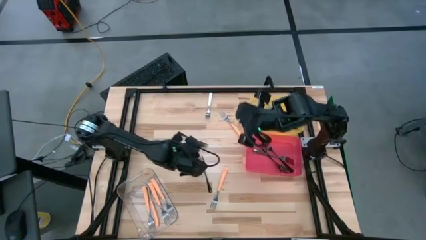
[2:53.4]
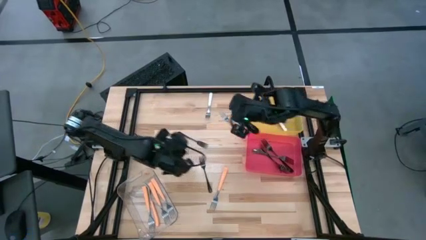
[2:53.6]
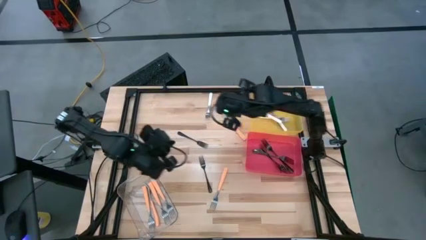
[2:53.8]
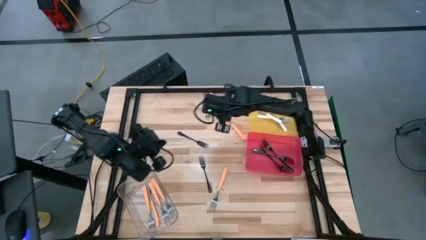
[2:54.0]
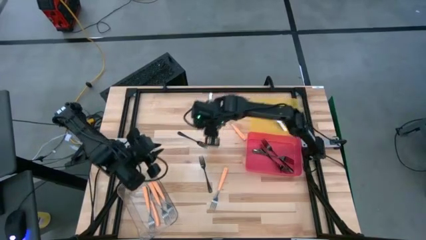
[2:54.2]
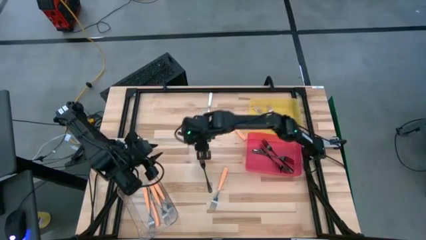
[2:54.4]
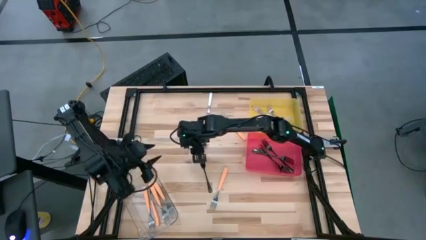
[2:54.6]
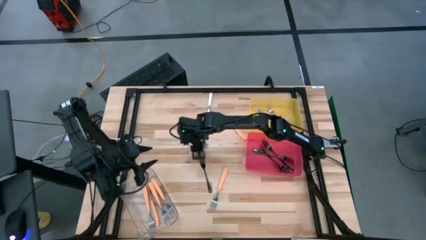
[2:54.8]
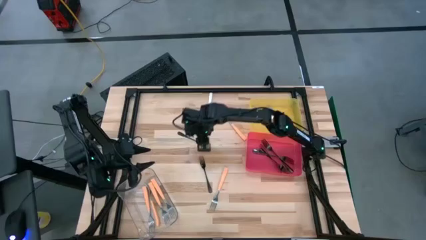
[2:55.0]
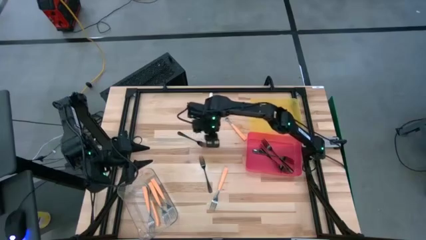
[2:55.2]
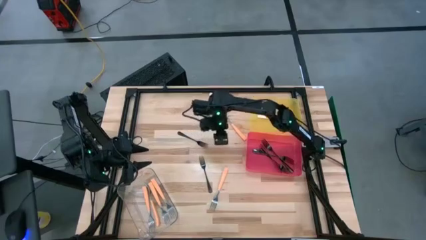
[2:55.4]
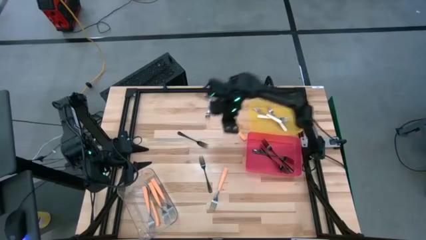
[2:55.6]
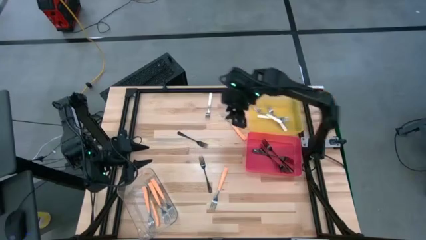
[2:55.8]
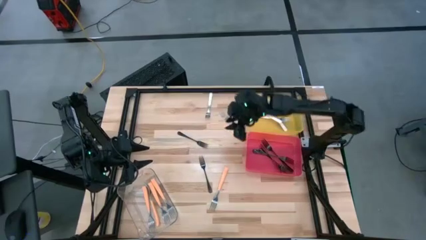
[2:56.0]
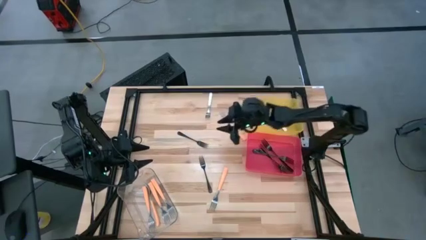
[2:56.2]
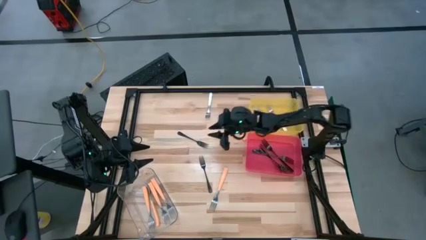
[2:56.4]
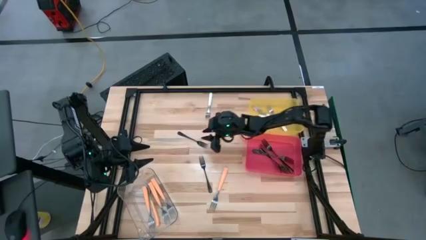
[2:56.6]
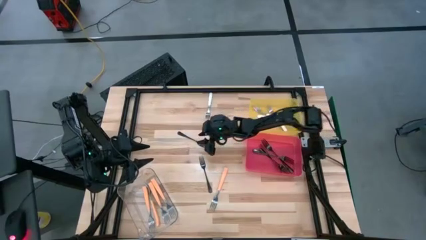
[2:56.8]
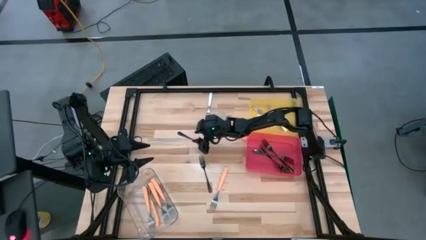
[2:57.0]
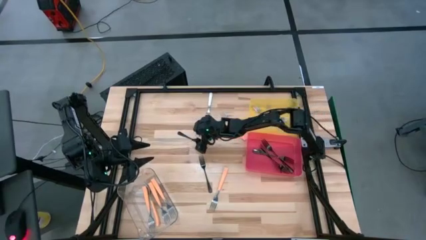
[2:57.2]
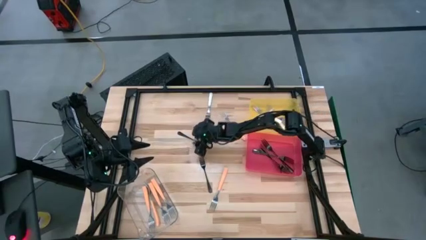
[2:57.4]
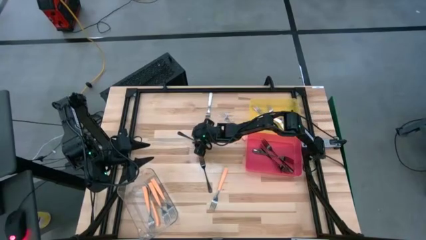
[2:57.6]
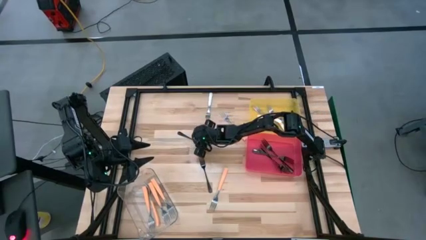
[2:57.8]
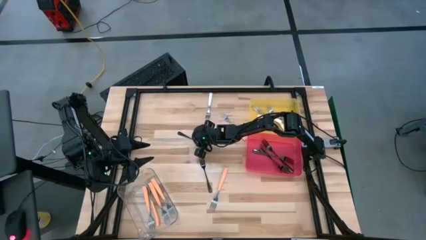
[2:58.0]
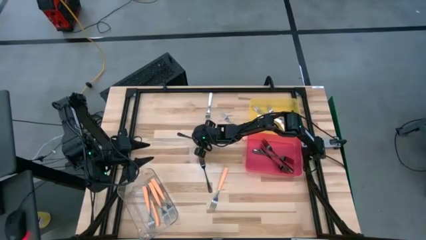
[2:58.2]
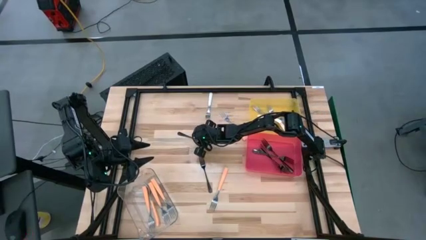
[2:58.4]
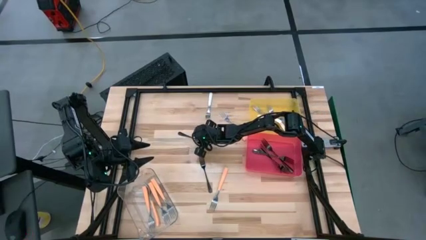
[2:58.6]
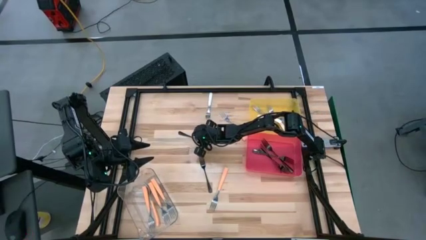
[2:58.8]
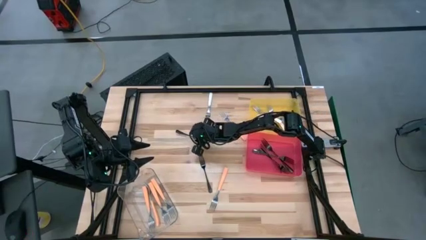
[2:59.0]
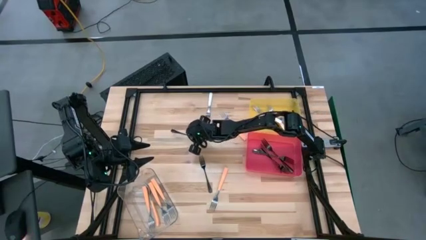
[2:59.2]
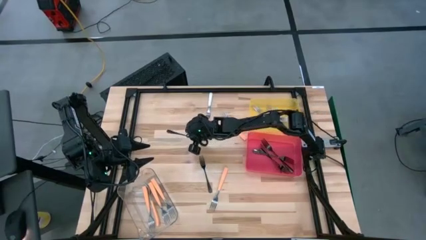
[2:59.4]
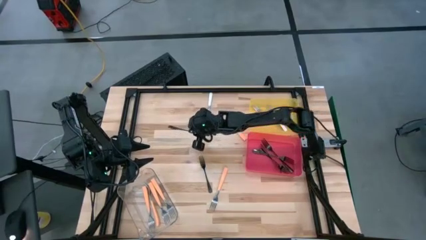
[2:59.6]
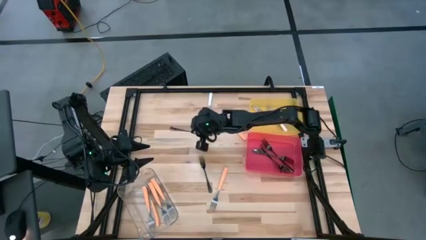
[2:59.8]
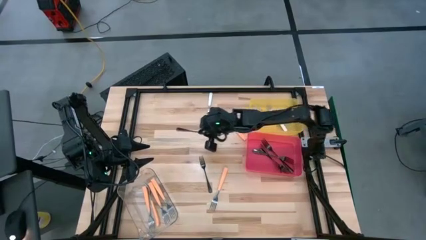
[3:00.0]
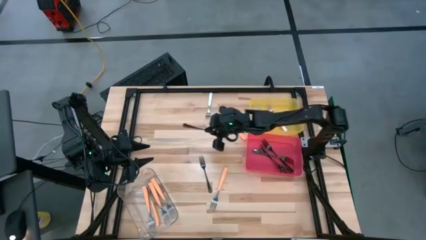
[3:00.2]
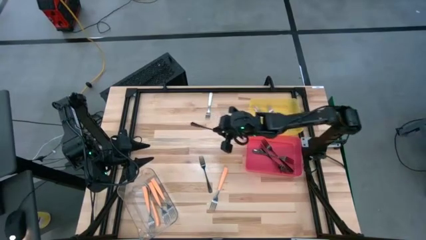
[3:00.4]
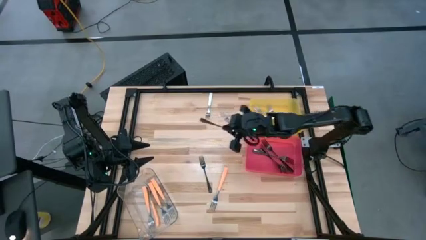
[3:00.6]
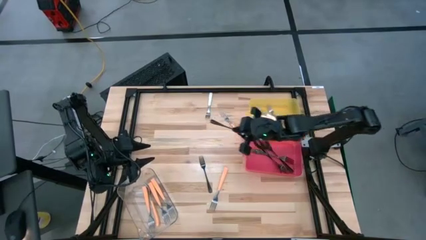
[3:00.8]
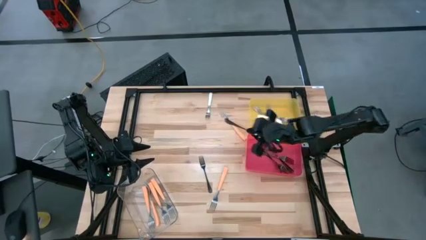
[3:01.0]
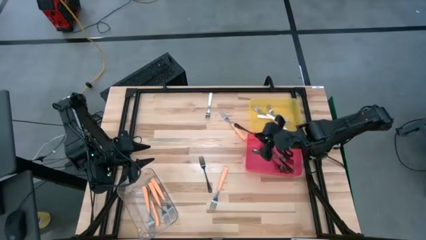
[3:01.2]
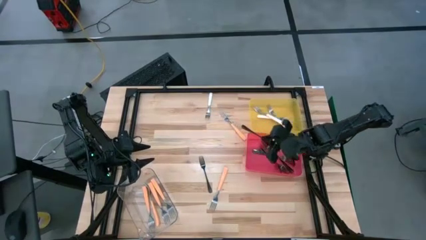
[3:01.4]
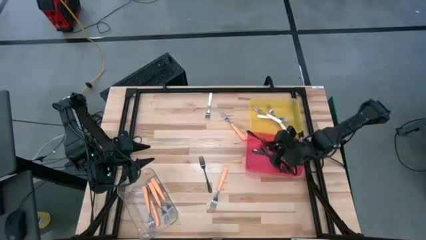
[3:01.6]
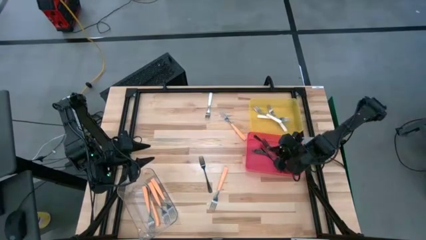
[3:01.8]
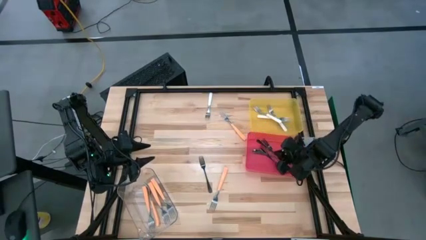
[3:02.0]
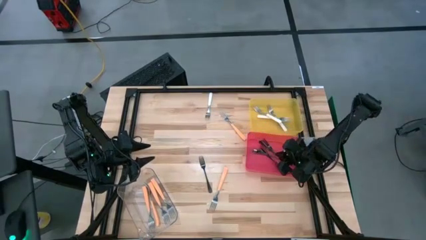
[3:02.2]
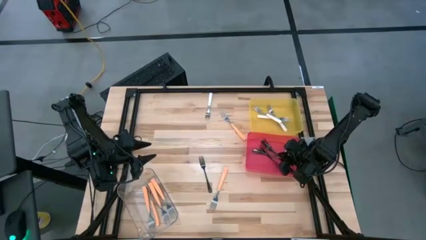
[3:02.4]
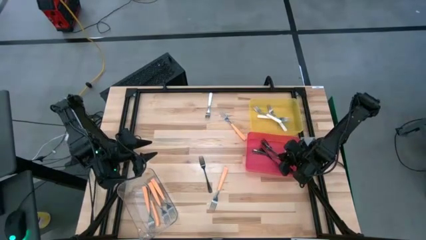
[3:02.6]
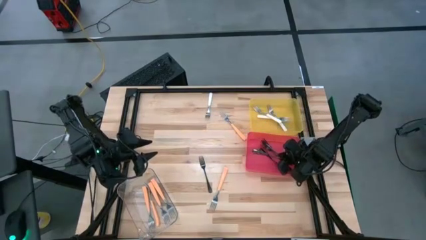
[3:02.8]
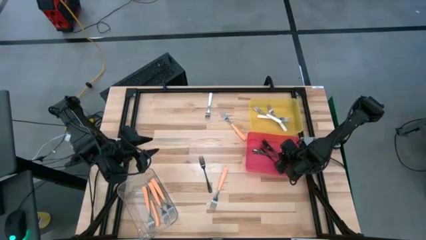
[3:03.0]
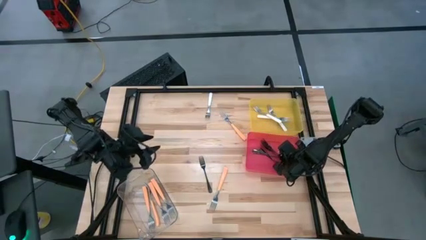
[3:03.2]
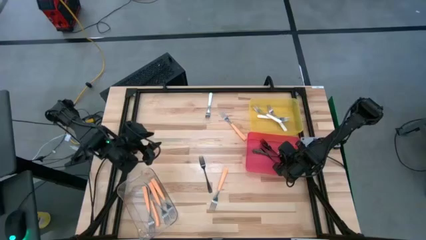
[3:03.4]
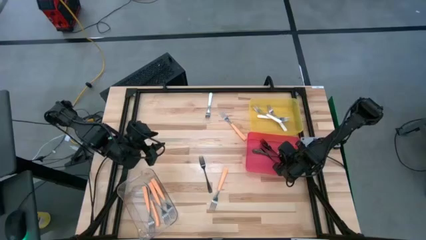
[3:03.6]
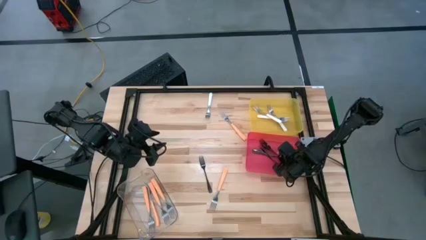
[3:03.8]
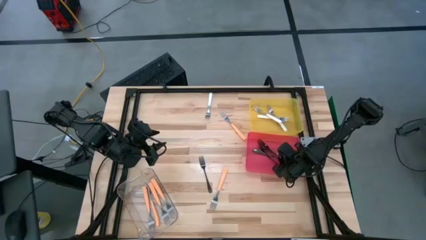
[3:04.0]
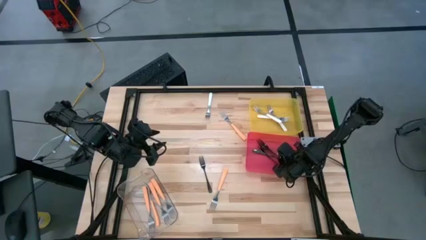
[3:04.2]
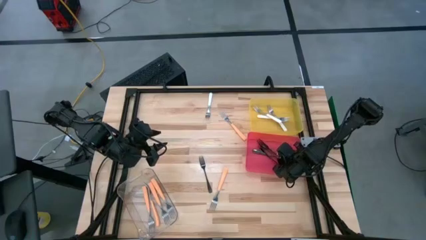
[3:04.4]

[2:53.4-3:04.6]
Task: Sort silverware by color (type)
Put the black fork into the red bin

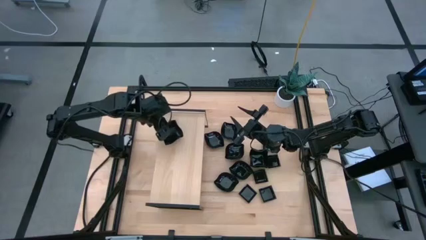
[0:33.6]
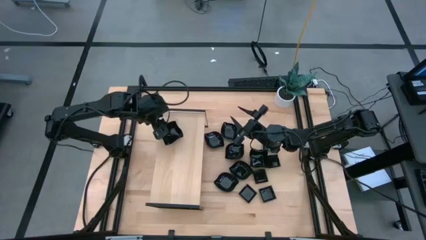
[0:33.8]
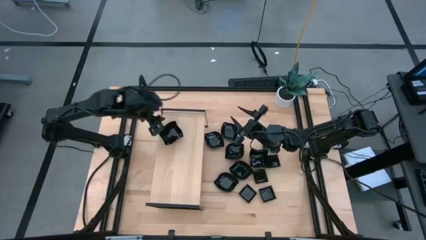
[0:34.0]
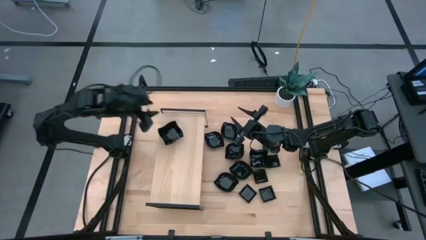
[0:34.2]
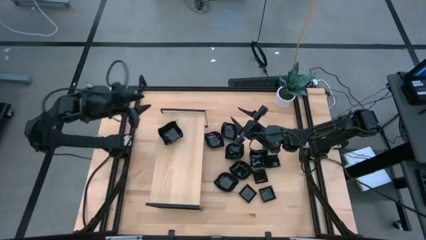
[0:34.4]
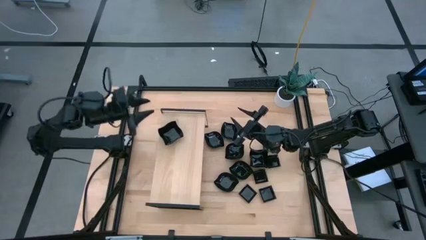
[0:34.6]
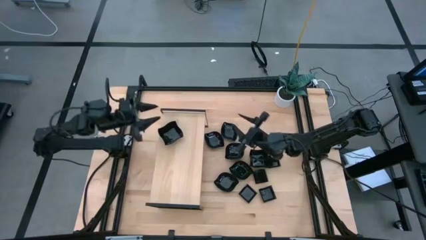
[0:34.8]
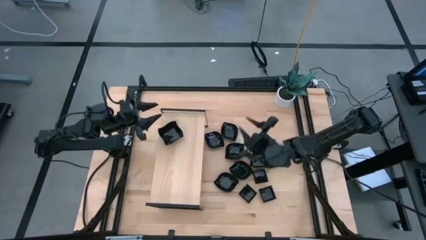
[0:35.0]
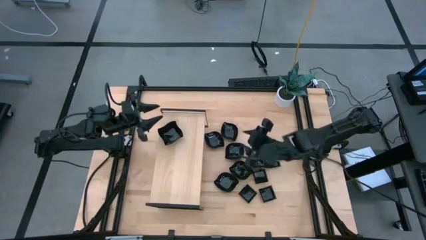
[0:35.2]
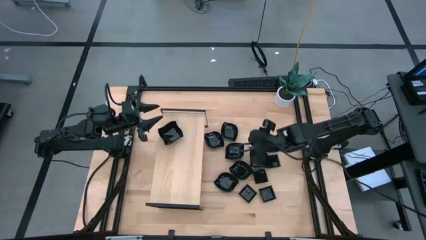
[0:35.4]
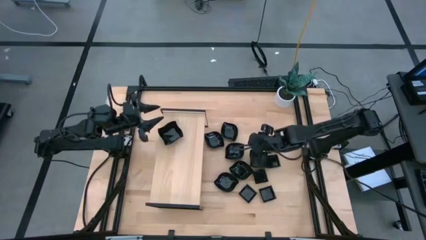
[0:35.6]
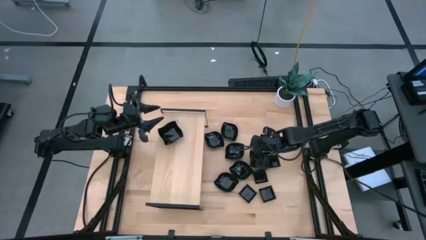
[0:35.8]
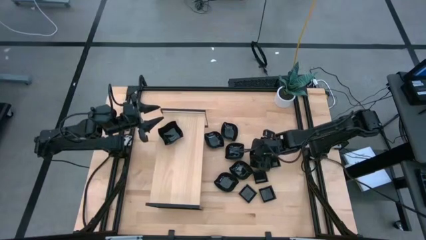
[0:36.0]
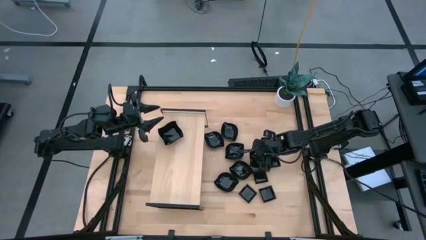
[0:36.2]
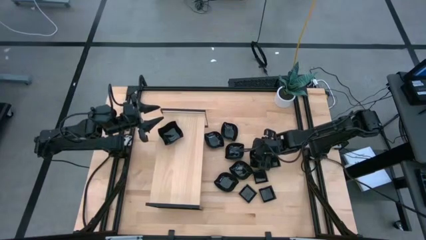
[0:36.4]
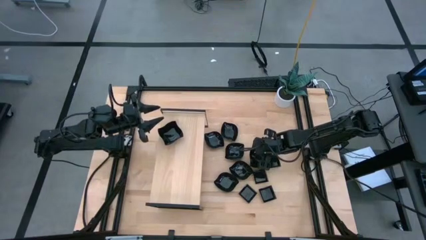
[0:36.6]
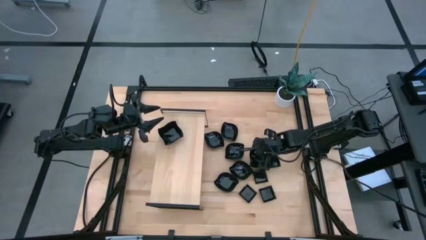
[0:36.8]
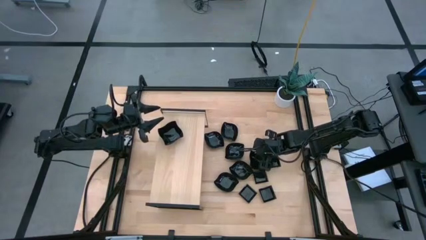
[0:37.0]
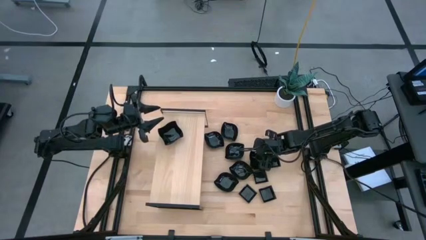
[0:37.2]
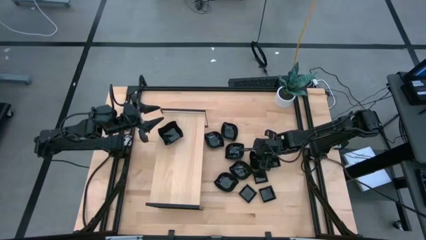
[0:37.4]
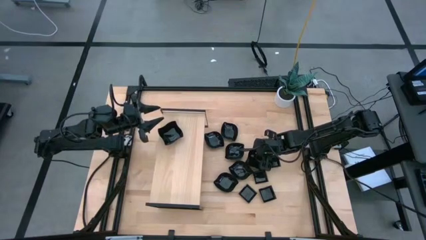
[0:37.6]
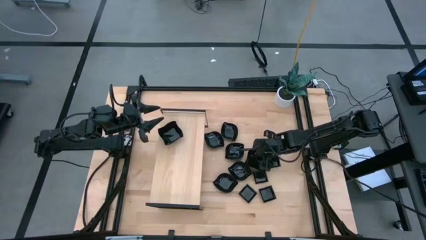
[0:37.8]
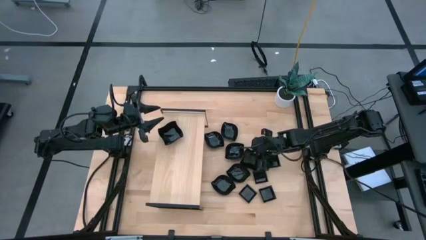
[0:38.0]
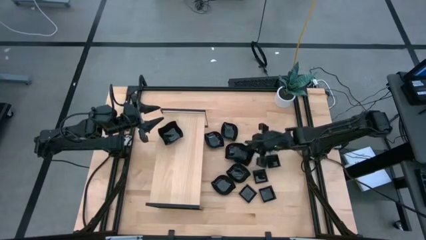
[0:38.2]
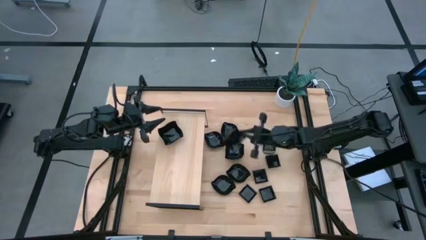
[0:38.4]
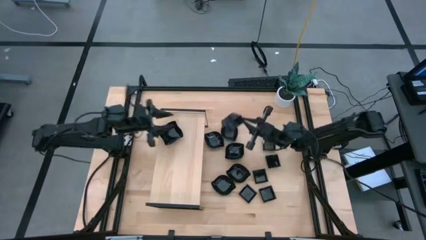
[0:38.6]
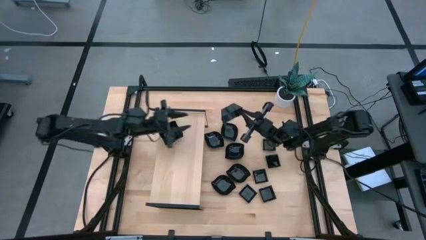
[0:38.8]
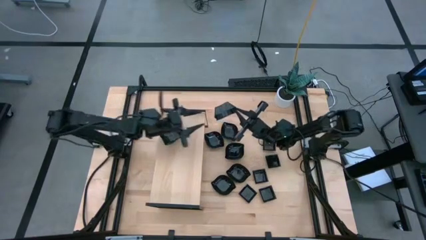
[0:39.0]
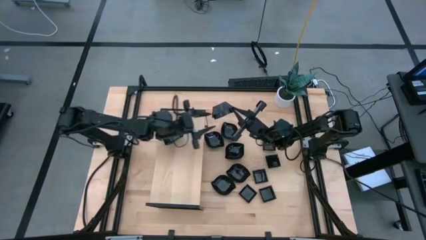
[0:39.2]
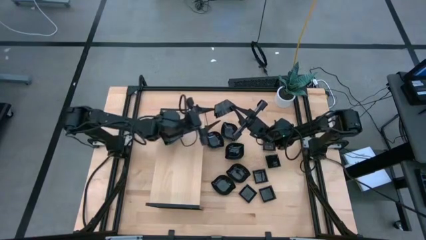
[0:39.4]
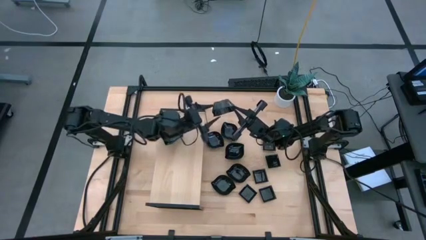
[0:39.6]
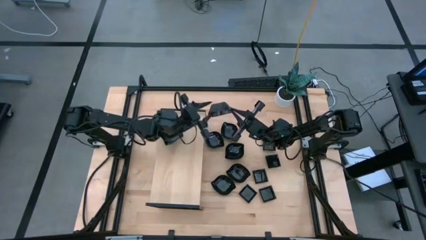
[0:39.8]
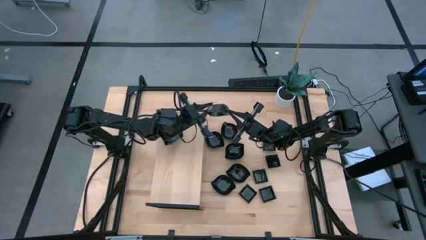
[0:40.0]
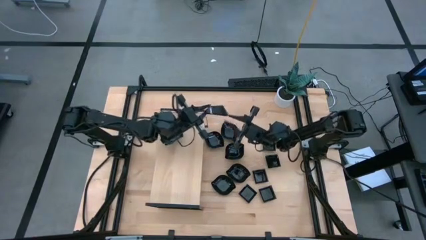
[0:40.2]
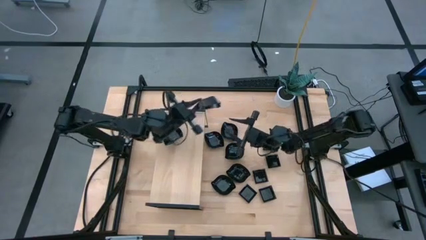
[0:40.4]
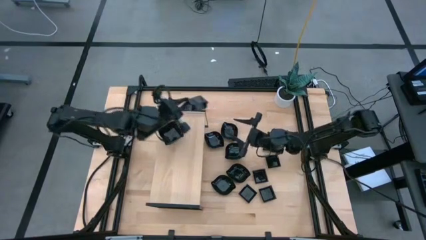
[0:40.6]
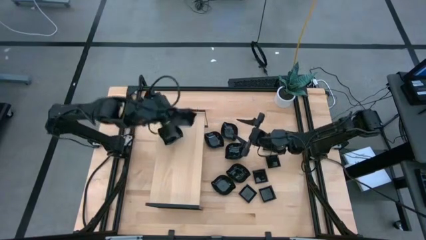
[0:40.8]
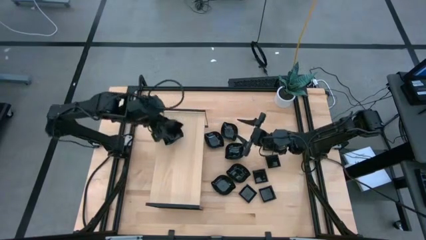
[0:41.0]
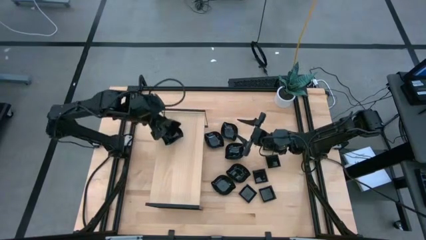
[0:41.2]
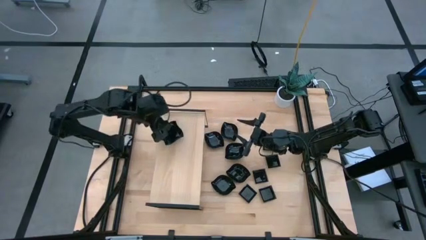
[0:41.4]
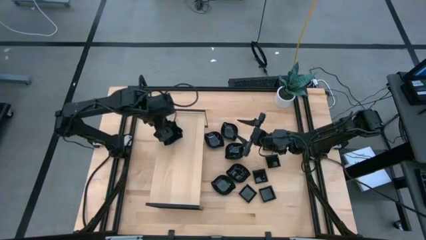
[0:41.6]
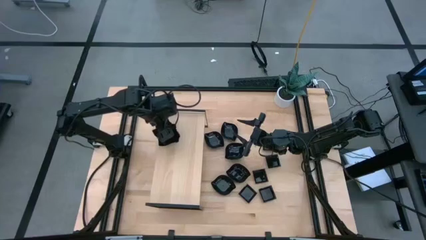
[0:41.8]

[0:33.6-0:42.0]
Task: Pick & Place Mini shaped plates
Stack the distorted square plate on top of the distorted square plate on the shelf
